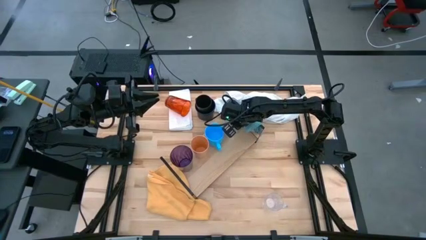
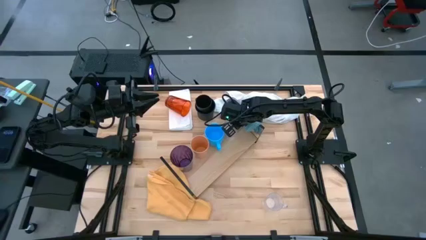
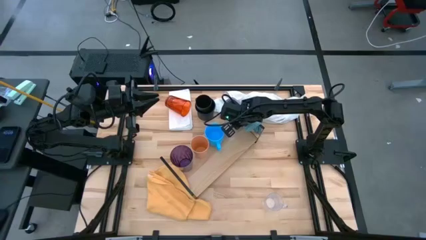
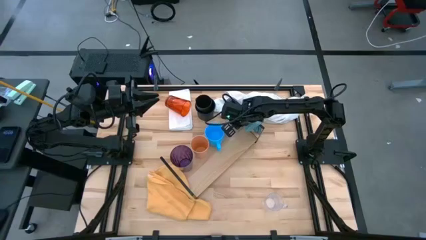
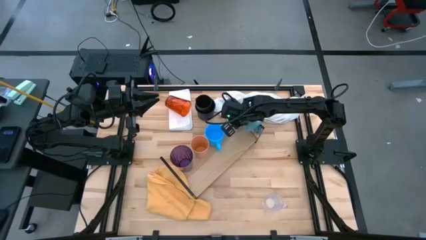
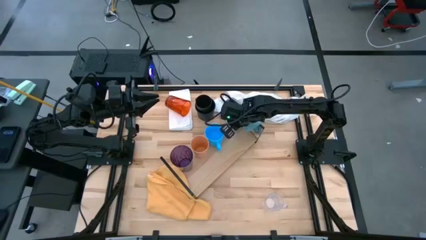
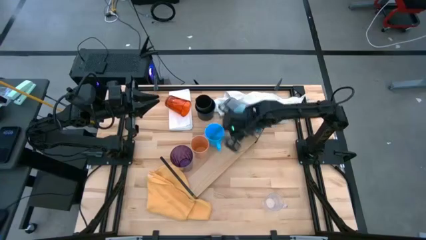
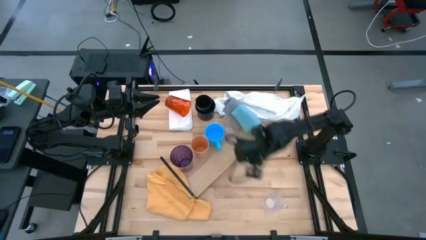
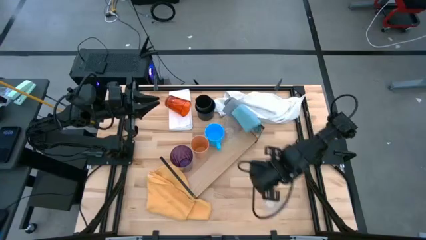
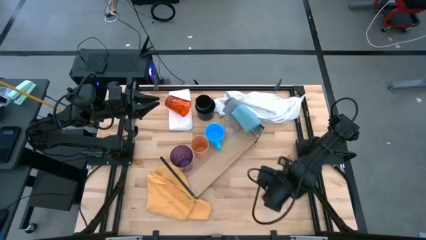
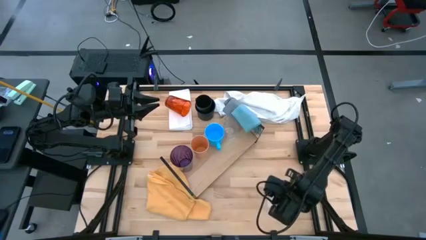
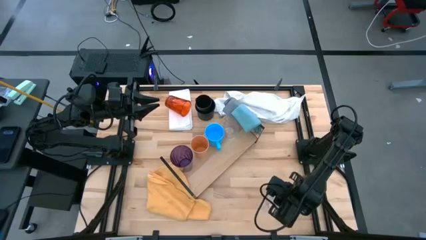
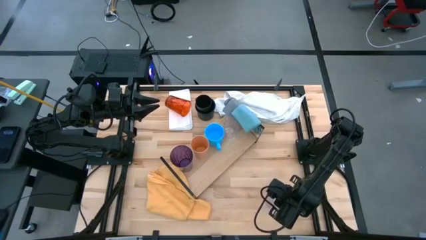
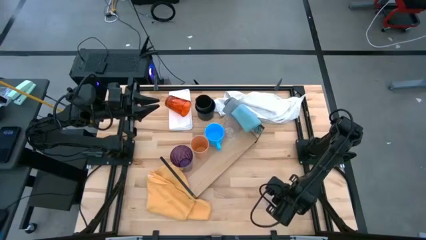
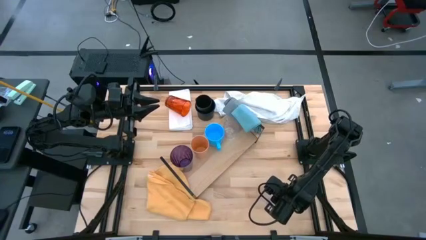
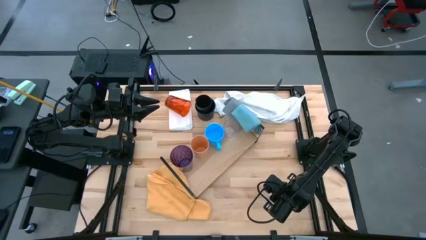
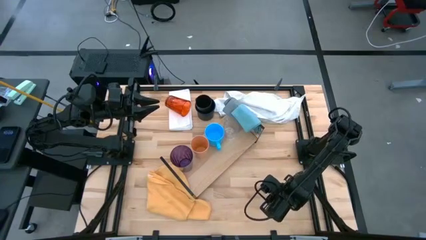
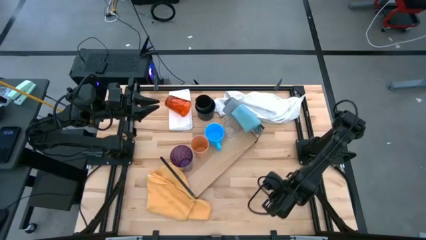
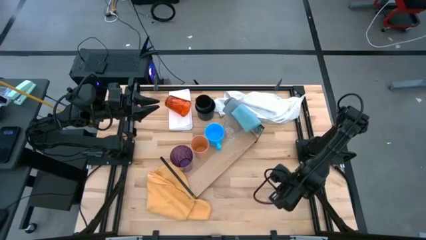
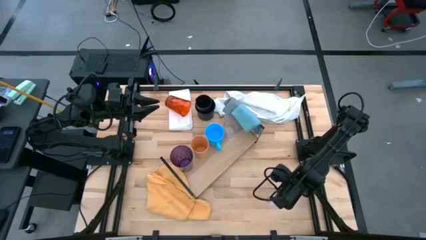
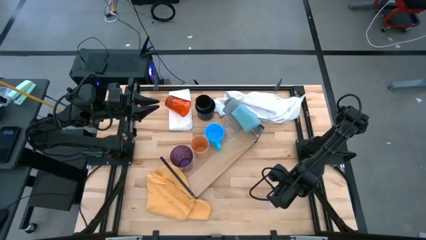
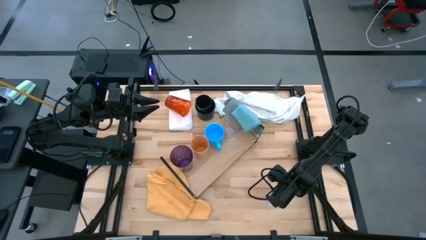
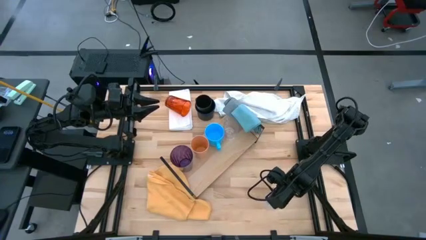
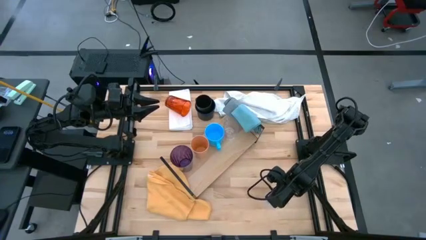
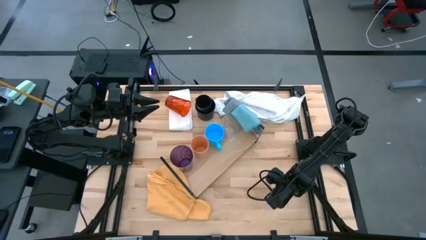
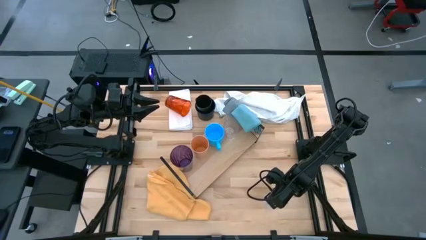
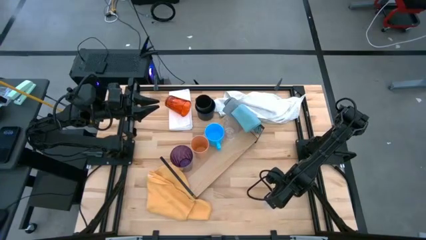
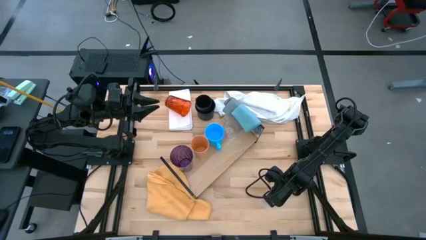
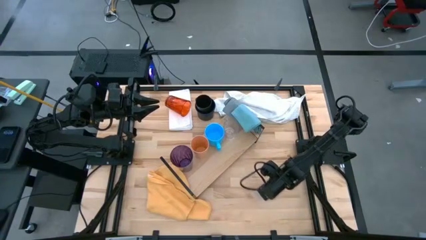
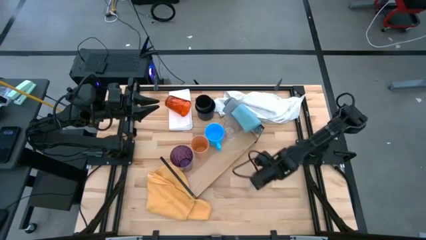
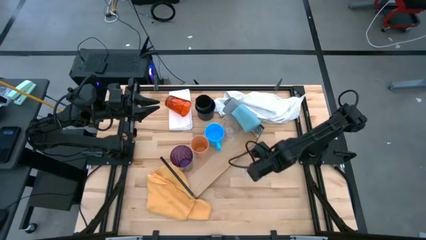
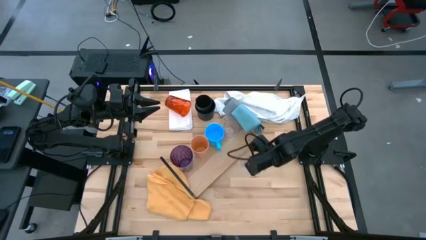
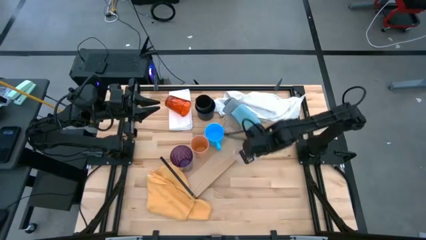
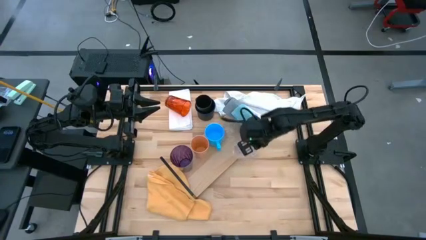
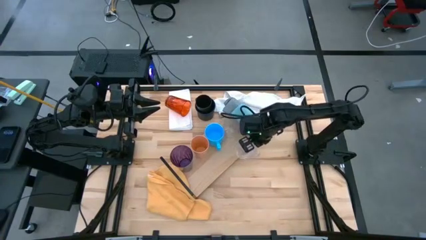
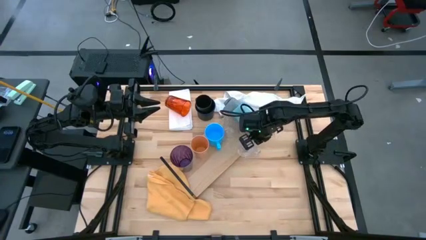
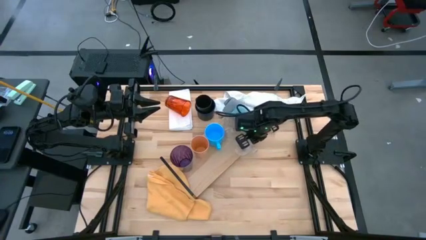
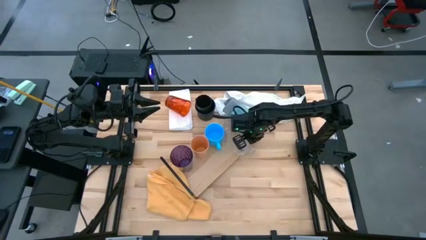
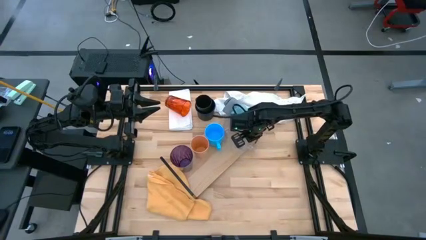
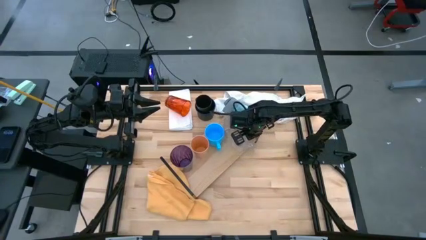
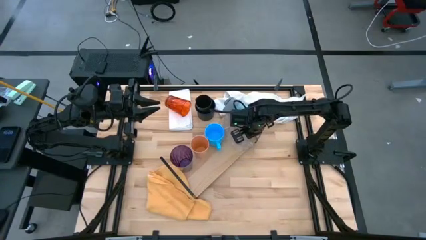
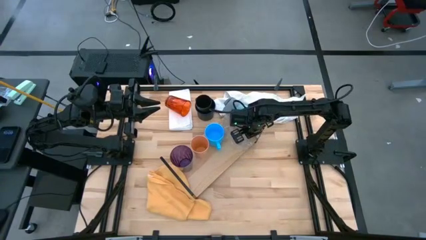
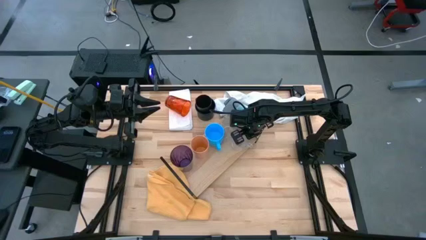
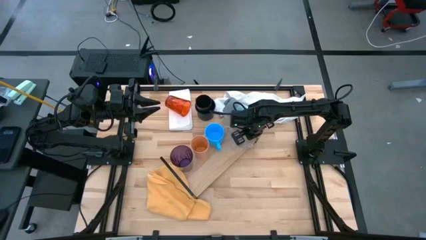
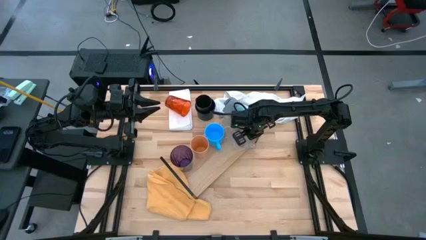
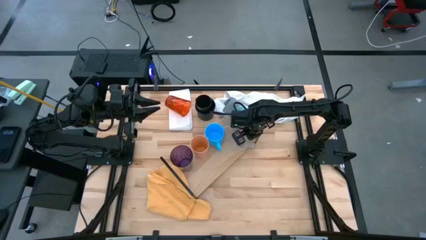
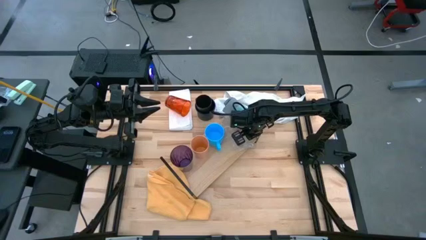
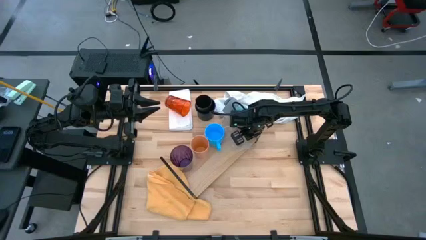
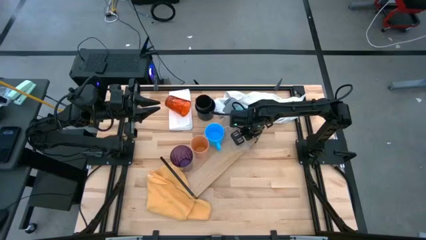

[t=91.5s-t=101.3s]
Task: Stack small to large cups/mugs on shelf
Put the transparent mug on the shelf

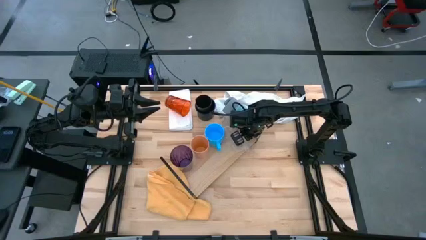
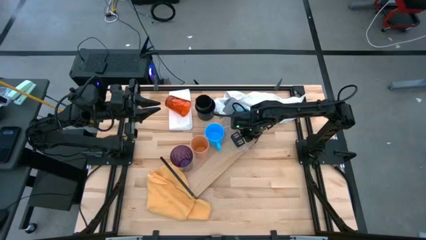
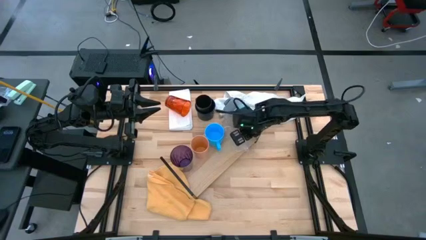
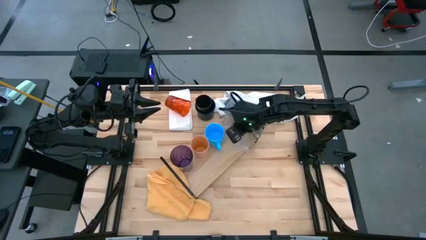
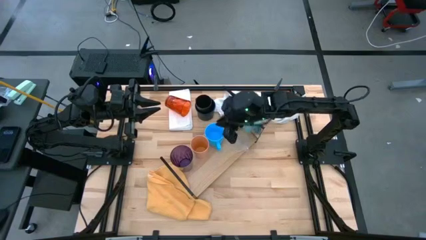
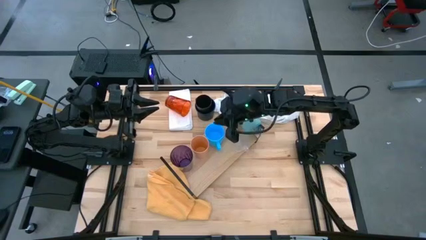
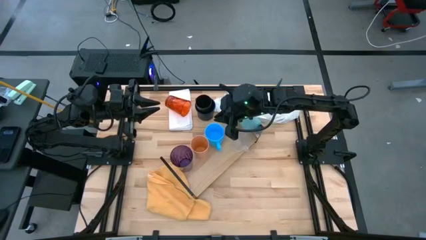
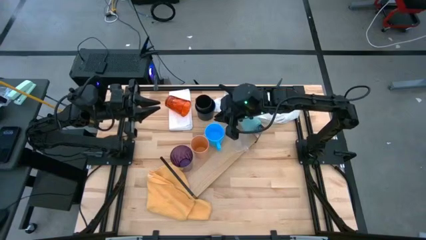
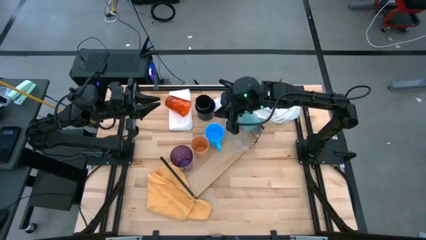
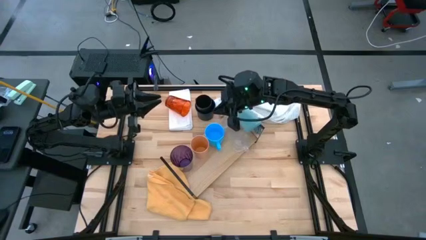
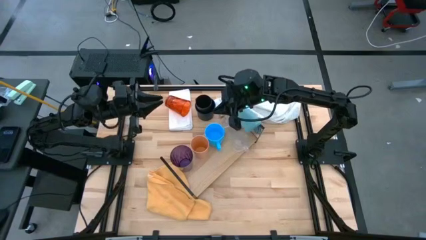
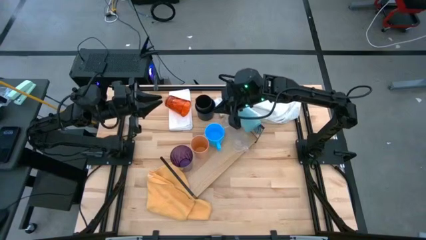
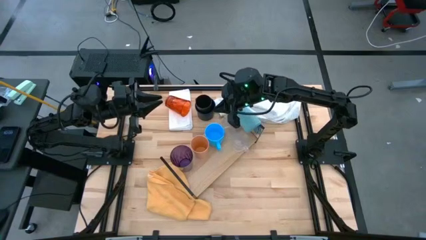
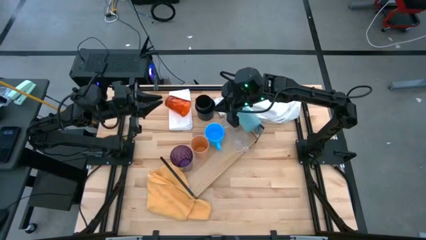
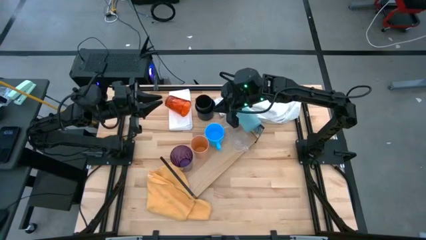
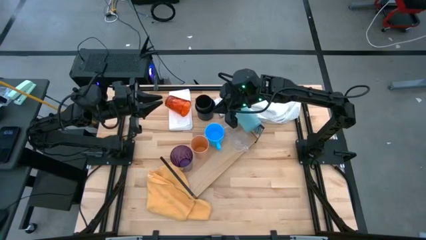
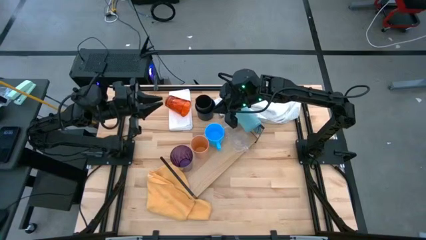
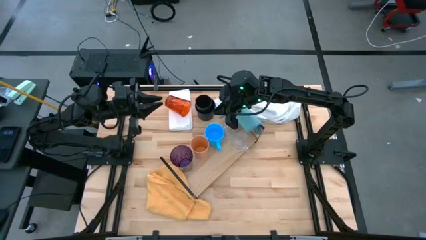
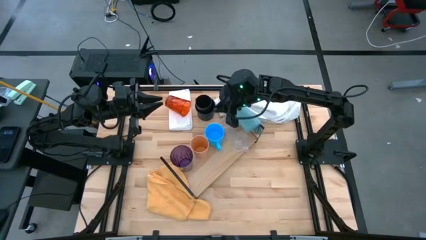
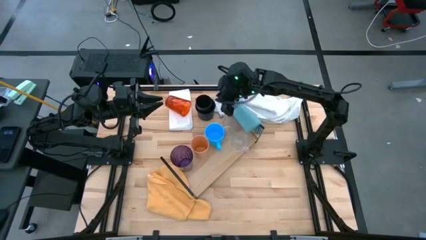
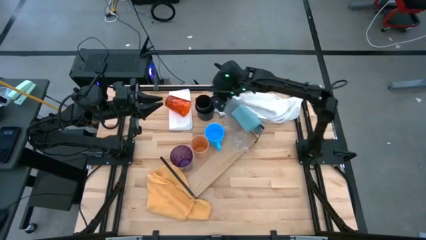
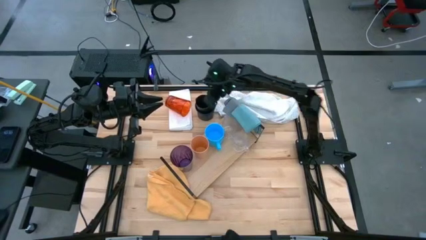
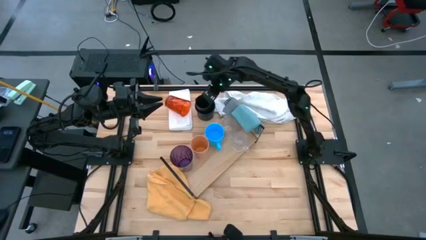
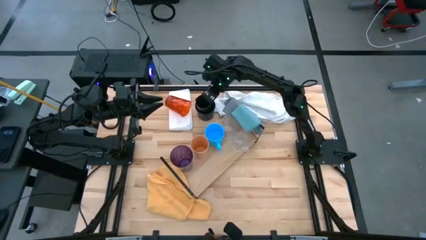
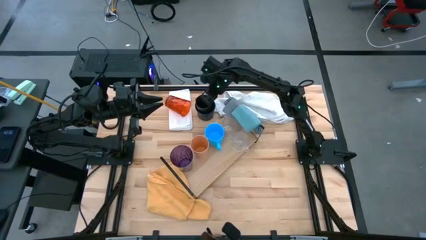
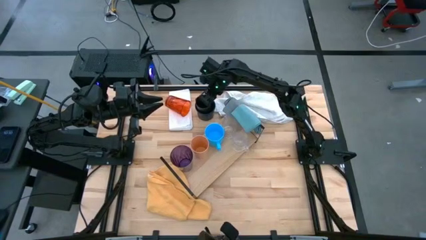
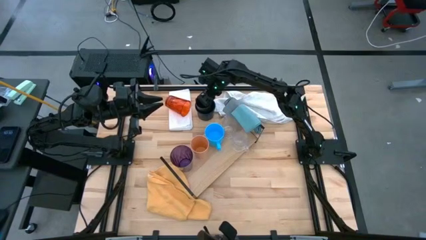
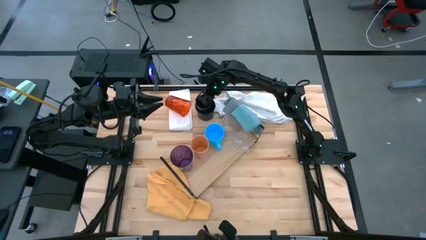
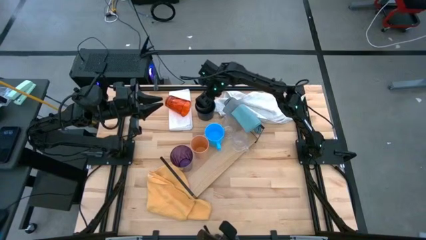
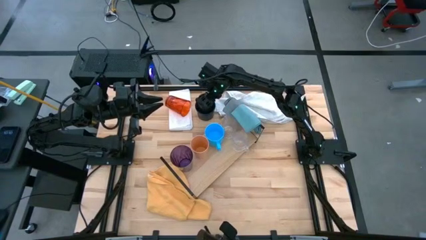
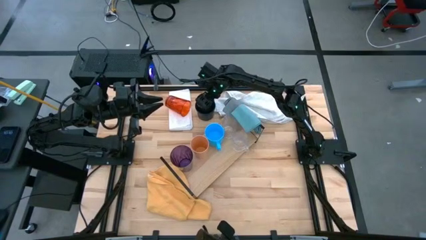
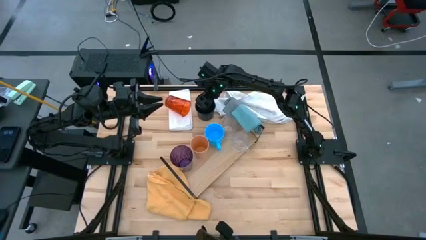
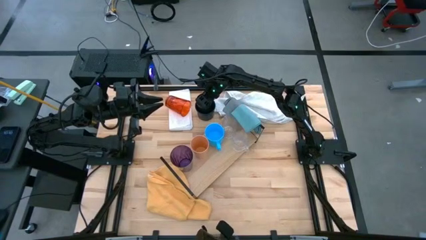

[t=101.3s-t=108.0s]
Remove the black cup from the dark blue mug
